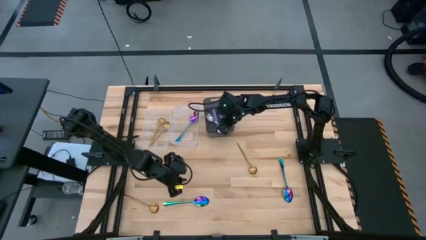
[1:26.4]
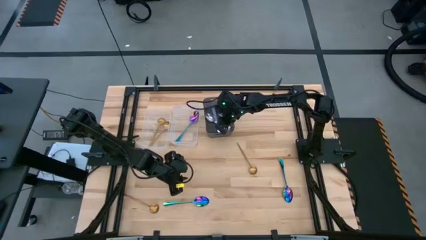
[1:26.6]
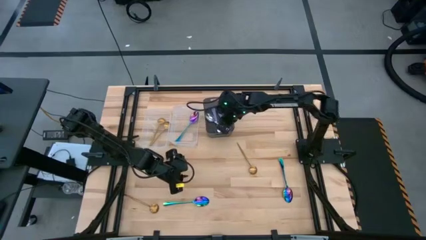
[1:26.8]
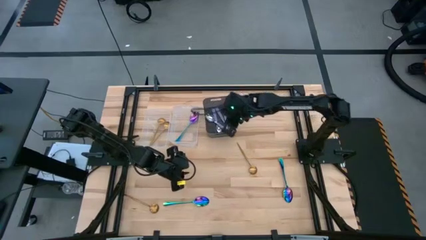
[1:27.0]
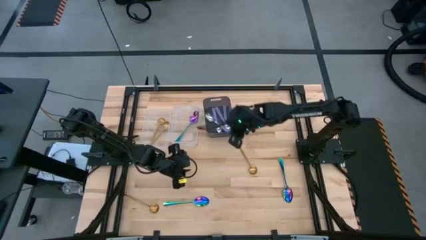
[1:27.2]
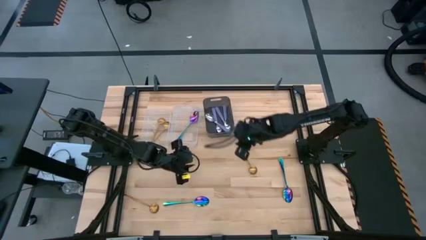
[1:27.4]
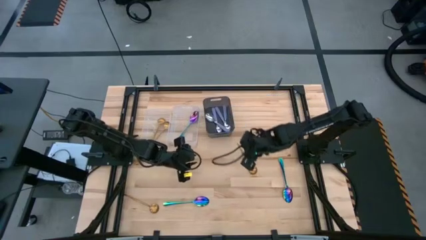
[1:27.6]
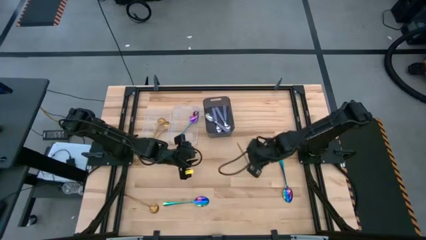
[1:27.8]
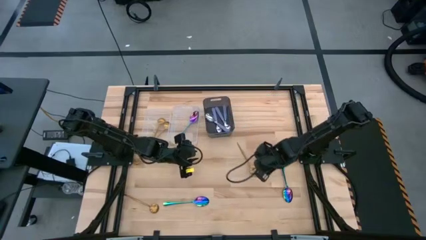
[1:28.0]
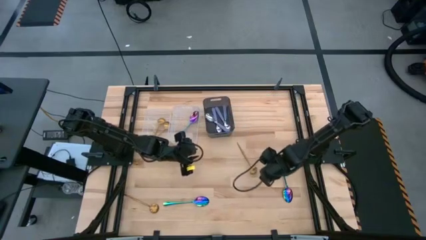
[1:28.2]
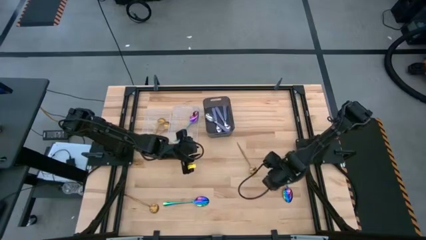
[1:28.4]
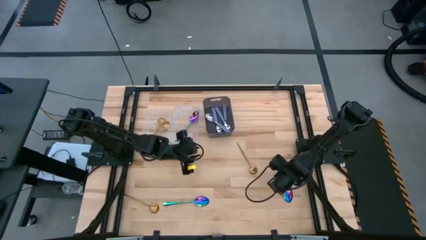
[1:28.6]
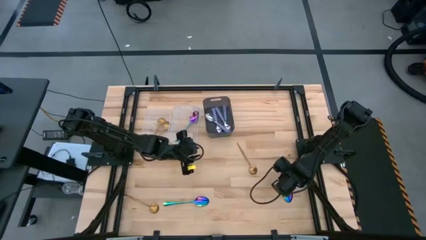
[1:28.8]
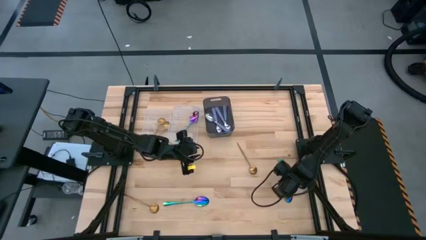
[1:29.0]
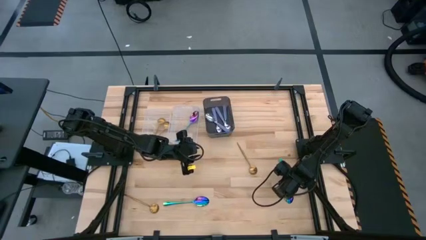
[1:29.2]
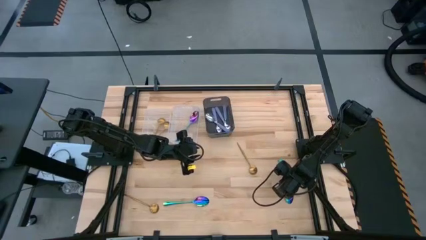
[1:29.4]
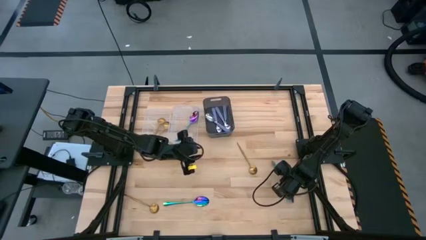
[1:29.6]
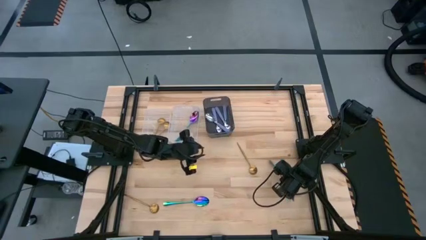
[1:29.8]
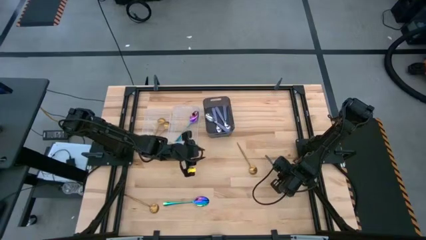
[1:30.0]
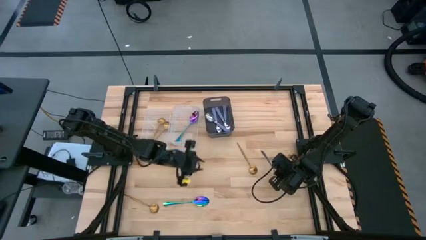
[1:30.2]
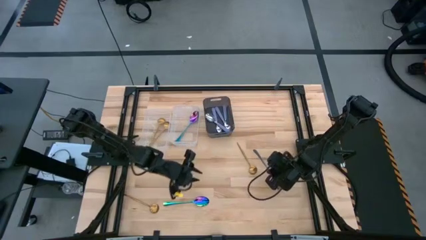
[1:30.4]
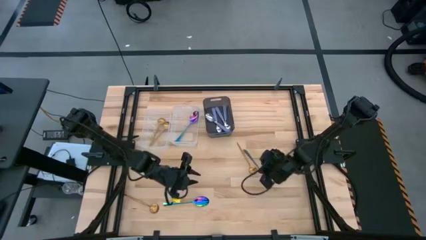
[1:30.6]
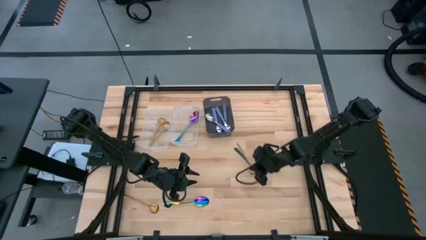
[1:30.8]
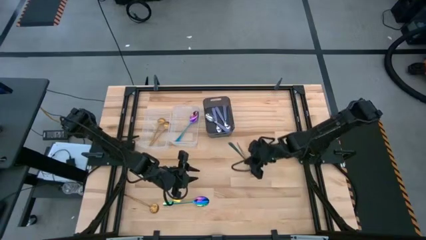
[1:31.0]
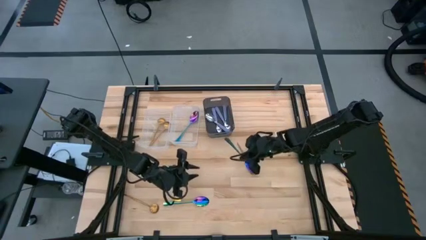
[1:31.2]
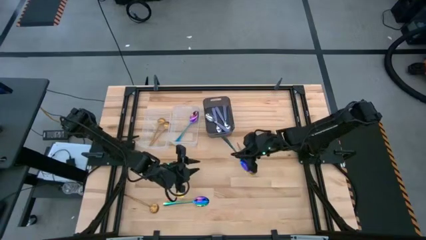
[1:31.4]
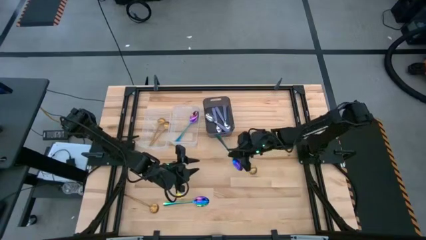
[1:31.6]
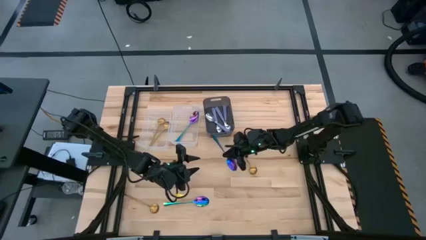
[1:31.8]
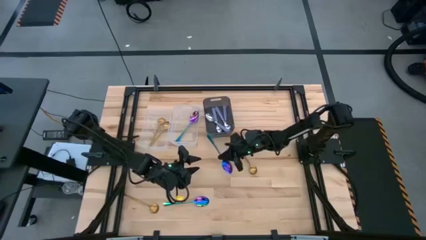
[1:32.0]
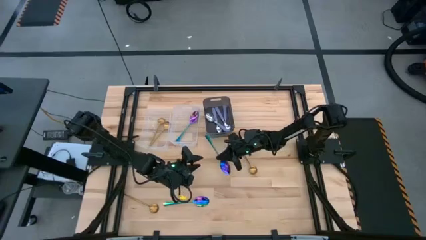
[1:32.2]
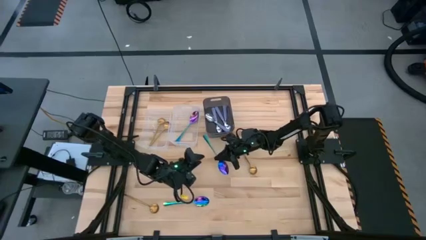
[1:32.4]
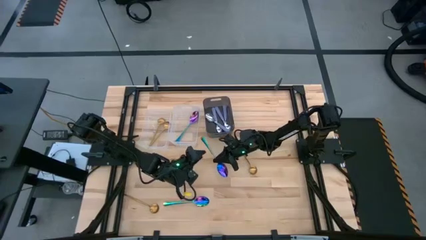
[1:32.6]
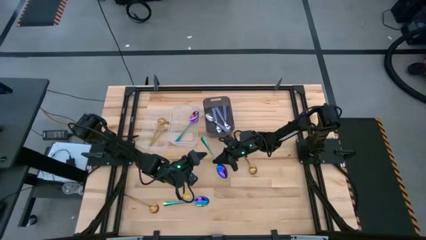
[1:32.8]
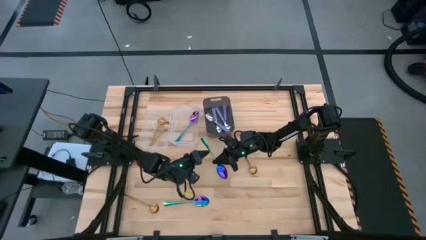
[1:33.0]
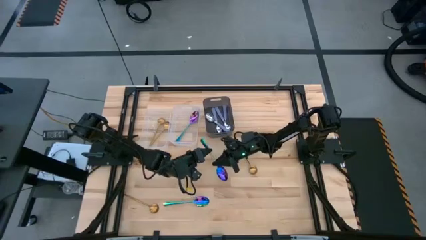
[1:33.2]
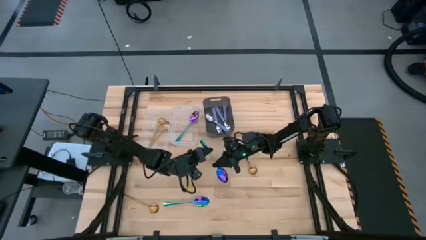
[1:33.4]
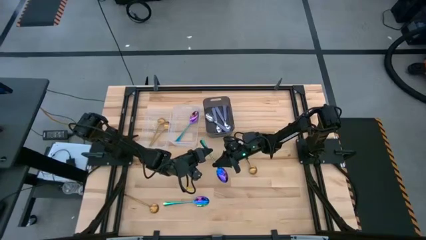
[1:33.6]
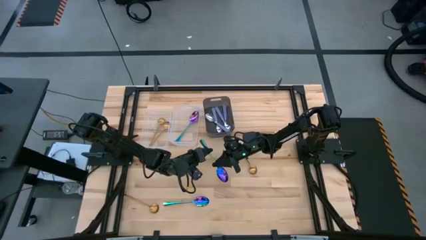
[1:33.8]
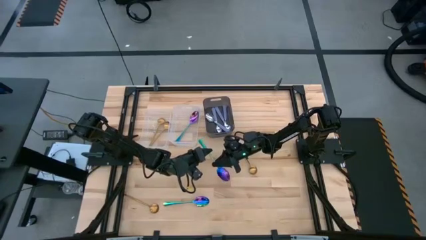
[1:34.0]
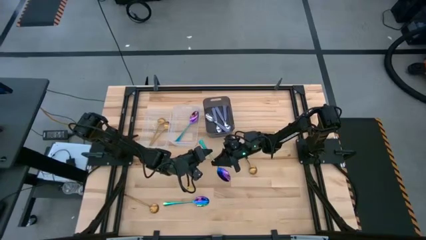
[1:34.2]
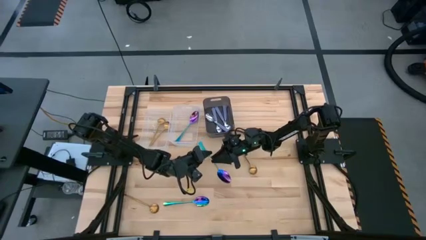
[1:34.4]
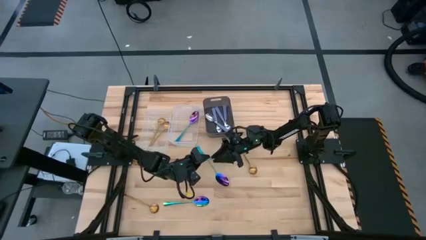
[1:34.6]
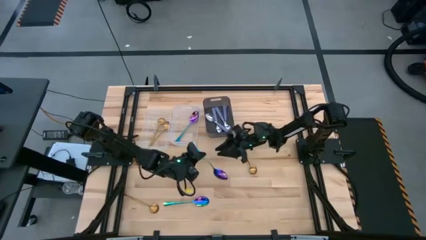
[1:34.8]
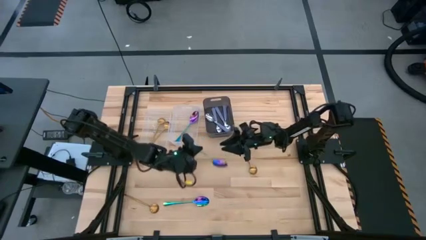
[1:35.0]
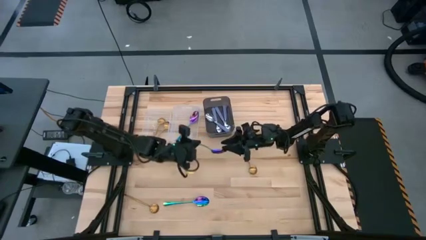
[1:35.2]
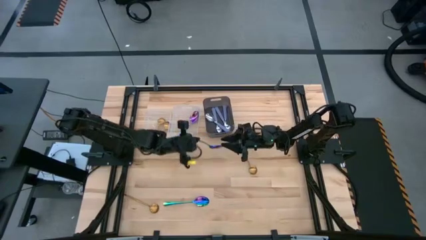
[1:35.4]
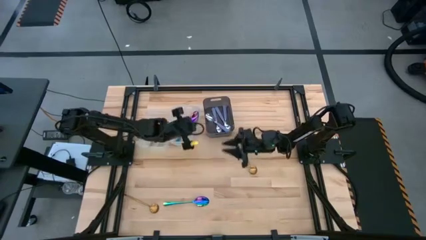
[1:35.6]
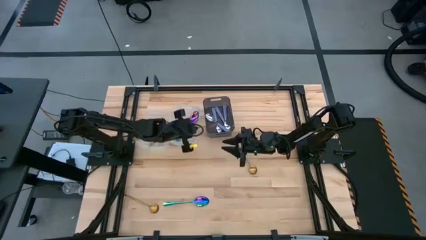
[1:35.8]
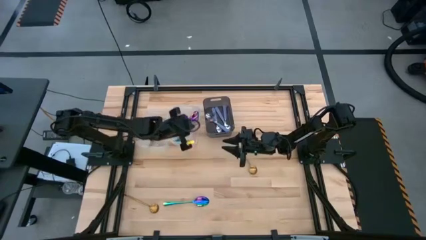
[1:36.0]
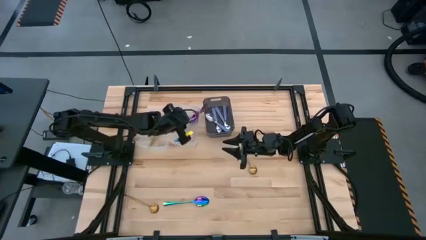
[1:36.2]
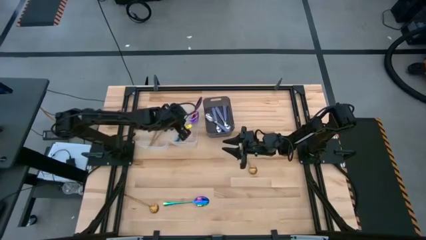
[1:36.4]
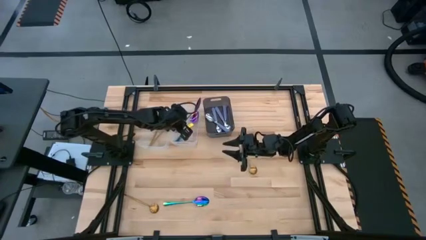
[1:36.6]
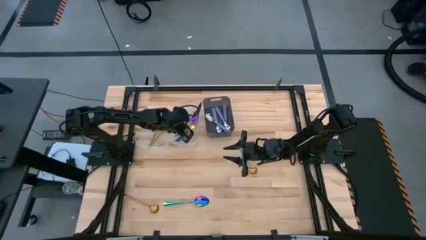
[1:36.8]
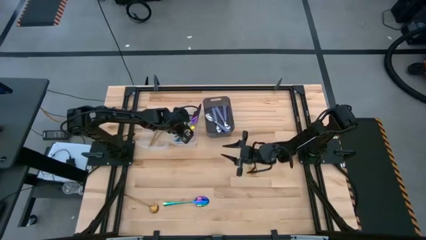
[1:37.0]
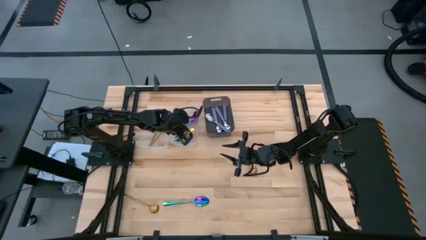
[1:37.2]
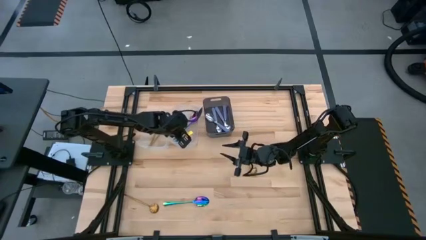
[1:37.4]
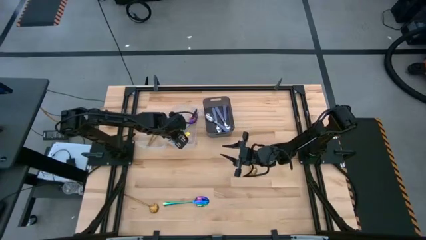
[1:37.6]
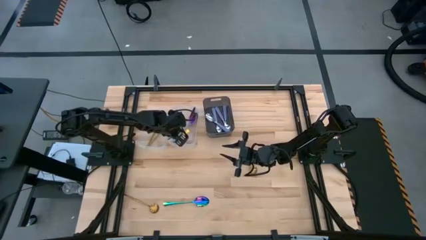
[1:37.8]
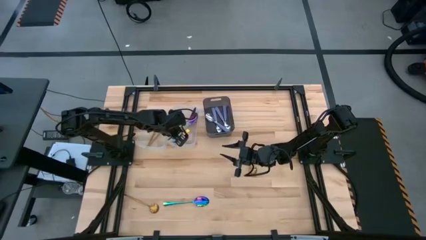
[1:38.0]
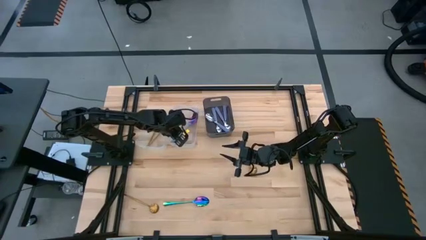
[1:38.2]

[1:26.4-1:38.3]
Task: Sort silverware by color (type)
Put the blue spoon into the right transparent bin

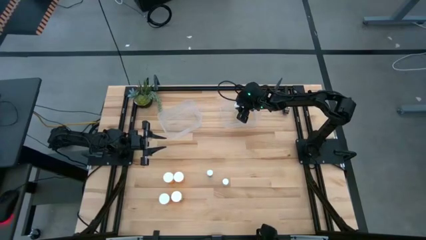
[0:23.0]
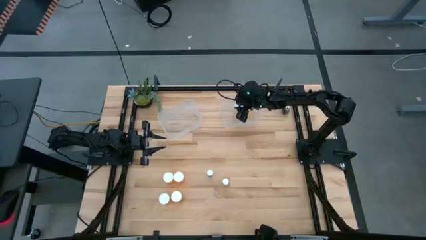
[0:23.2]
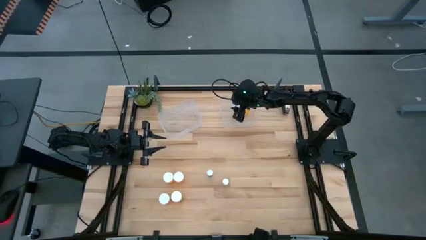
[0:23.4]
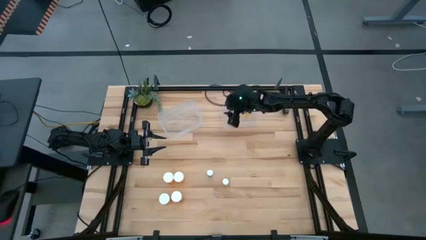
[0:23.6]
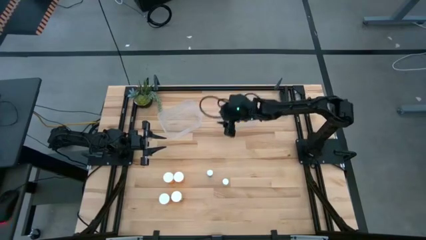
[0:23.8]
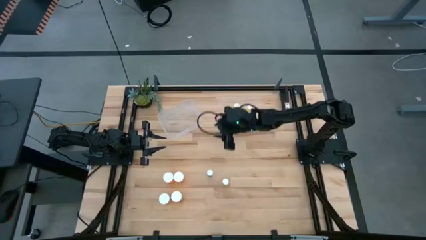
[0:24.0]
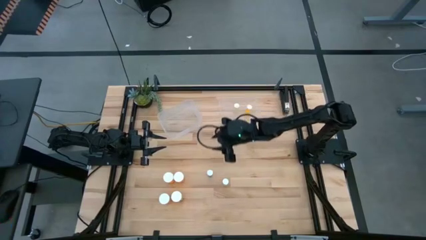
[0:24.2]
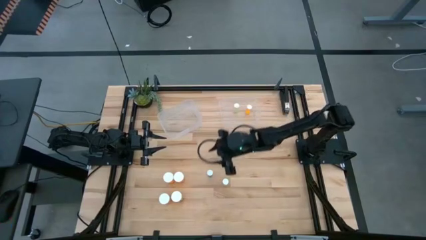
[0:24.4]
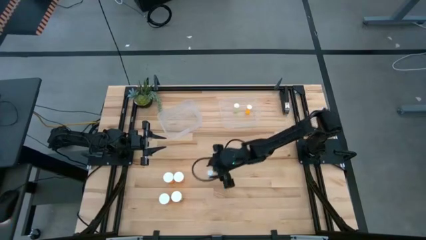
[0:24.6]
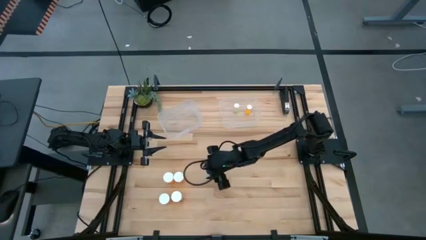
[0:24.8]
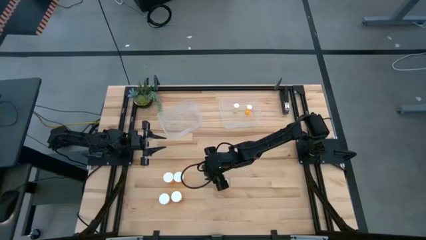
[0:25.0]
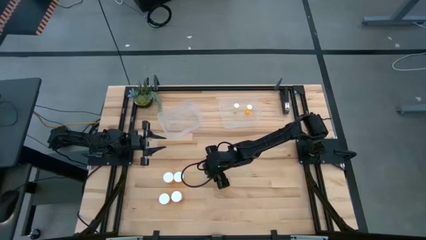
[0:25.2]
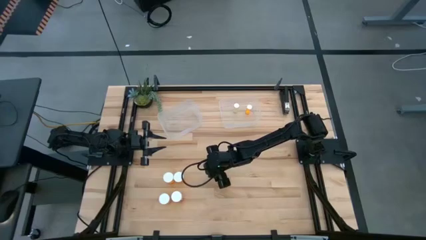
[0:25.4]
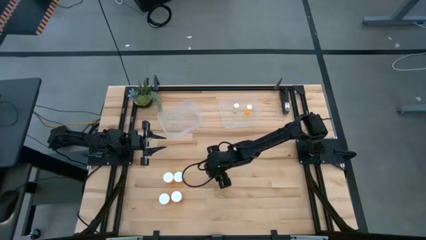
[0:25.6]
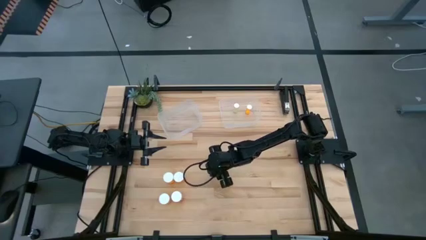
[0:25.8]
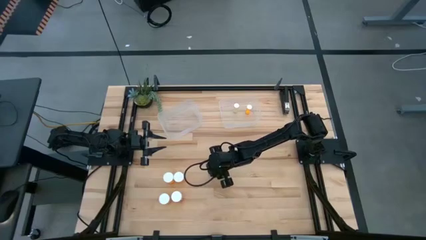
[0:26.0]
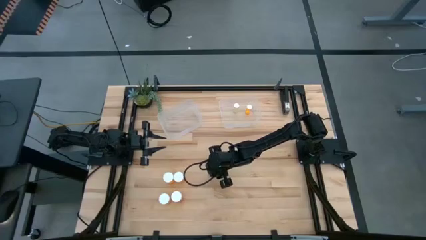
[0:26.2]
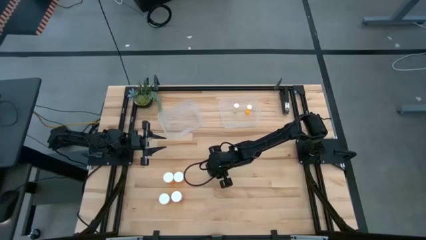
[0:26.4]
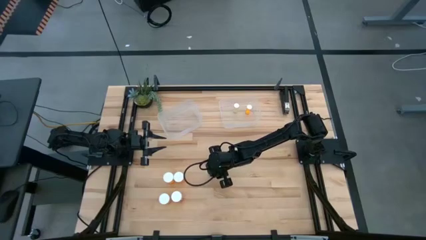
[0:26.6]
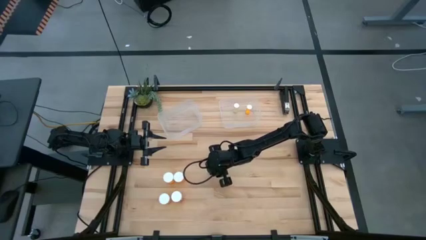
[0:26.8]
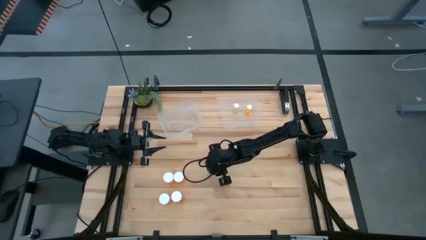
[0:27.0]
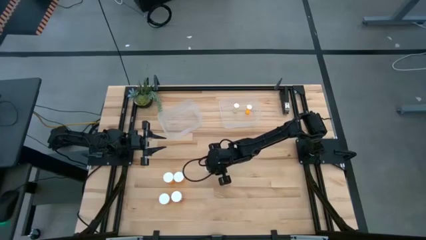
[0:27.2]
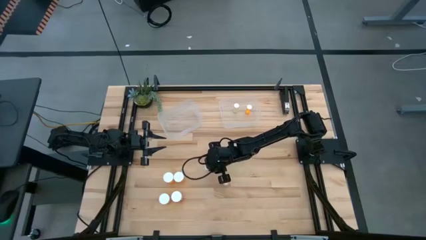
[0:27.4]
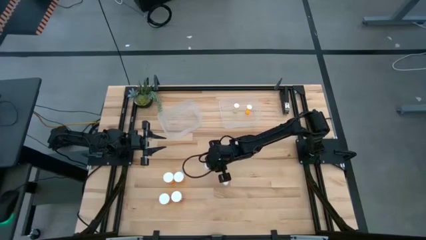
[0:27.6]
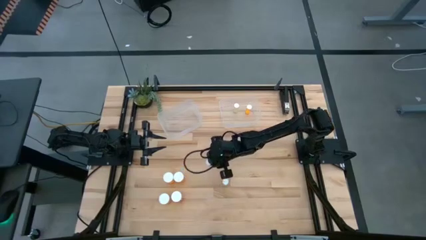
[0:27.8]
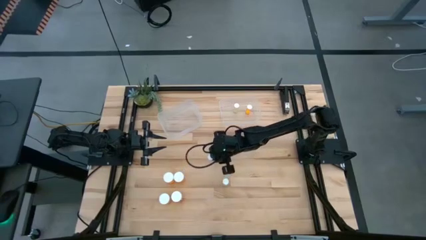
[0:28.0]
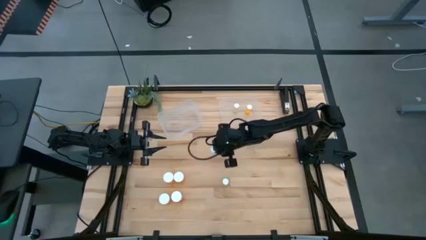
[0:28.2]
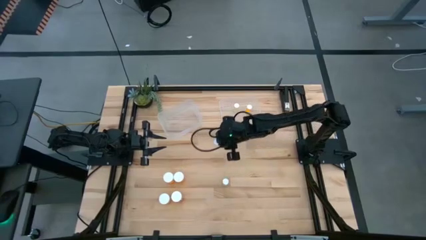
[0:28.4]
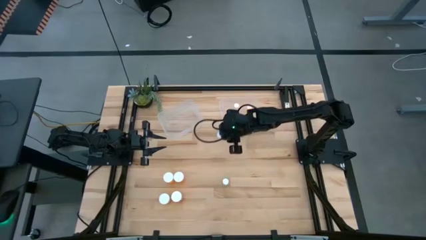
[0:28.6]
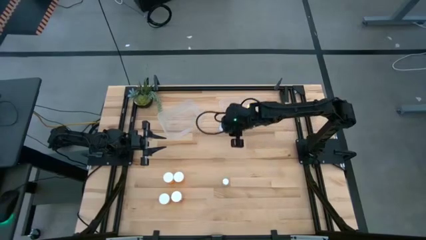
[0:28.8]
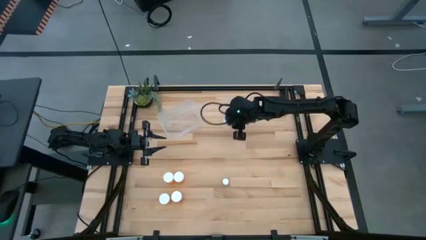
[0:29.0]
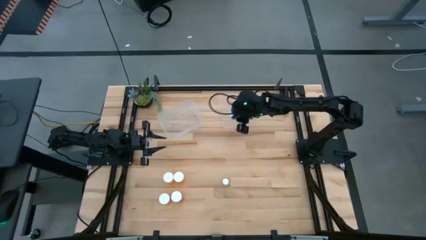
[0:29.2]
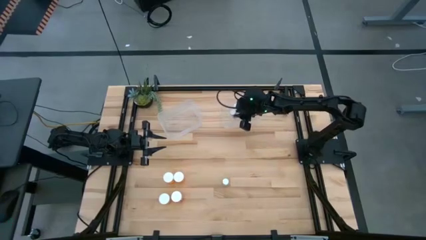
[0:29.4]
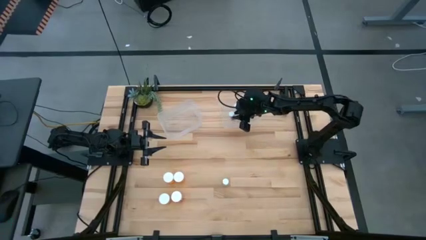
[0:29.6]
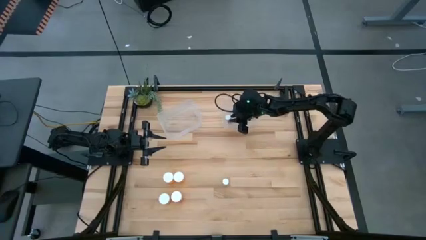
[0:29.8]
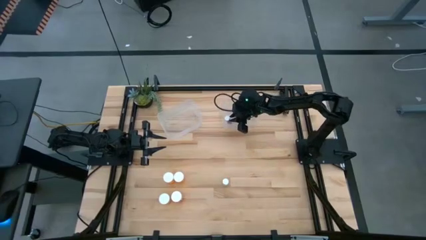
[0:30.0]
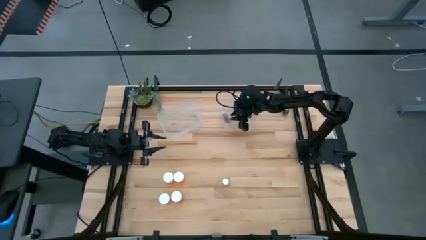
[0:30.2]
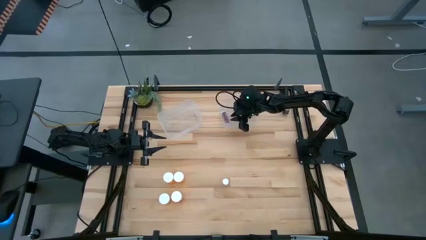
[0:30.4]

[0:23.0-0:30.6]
Task: Pick and place medicine bottles into bin by pill shape (circle, oval)
Put the blue pill bottle into the right transparent bin
